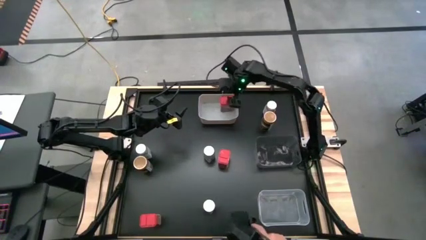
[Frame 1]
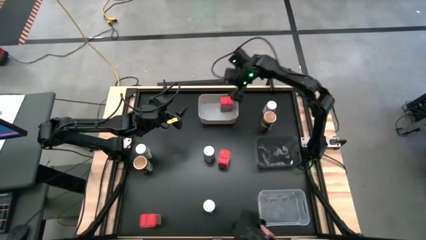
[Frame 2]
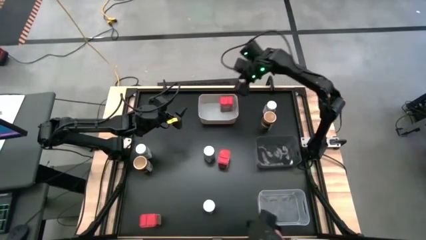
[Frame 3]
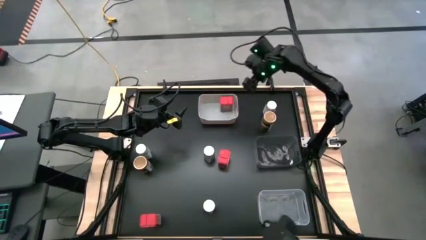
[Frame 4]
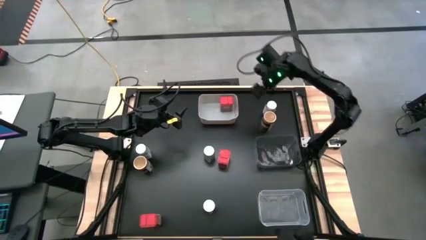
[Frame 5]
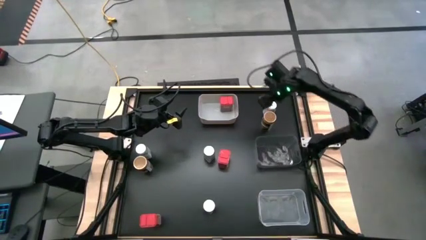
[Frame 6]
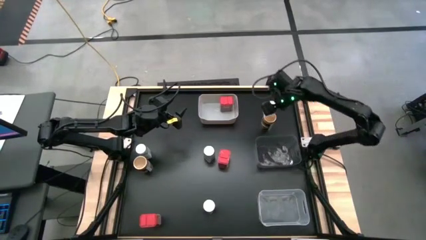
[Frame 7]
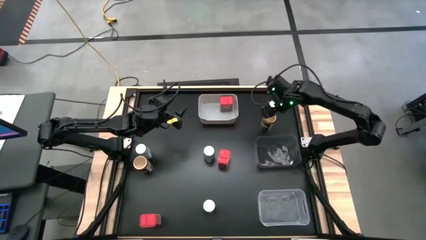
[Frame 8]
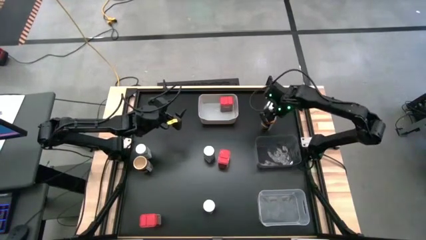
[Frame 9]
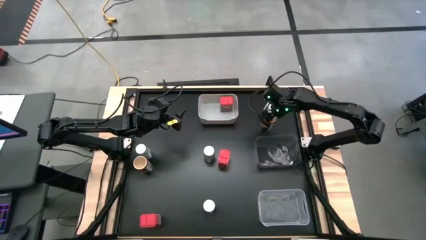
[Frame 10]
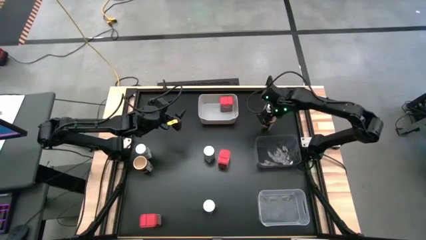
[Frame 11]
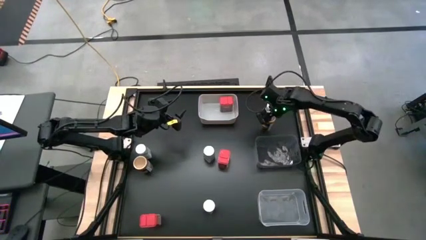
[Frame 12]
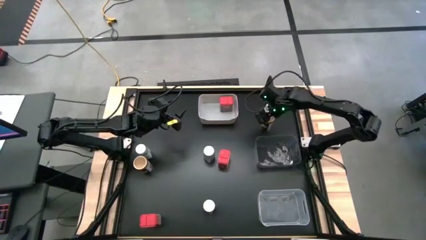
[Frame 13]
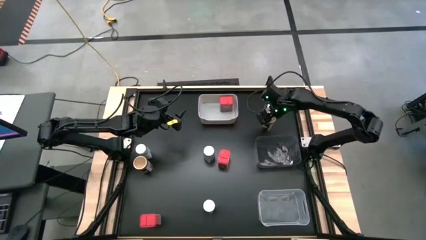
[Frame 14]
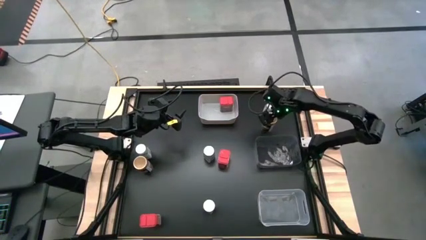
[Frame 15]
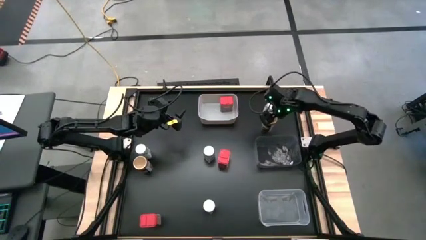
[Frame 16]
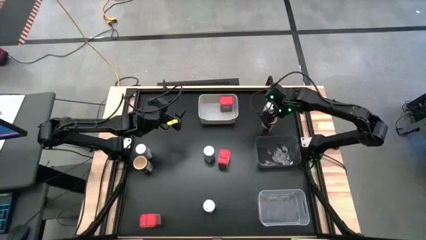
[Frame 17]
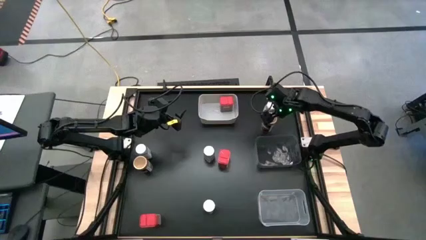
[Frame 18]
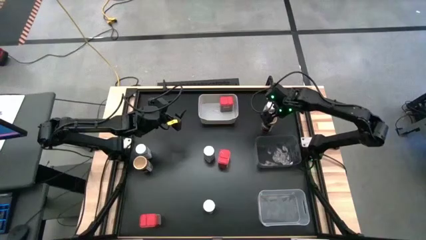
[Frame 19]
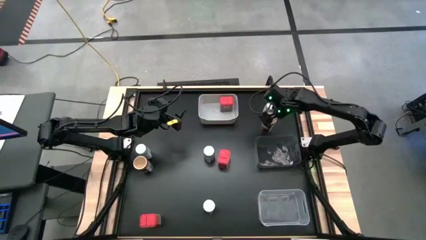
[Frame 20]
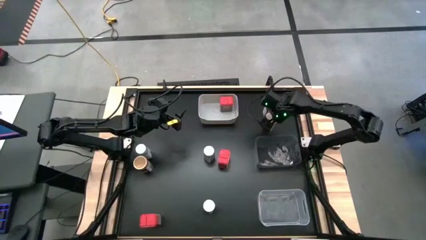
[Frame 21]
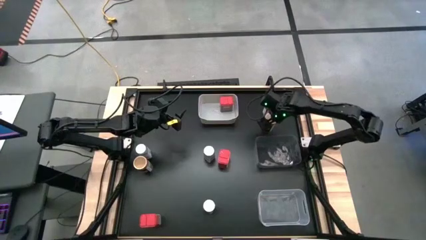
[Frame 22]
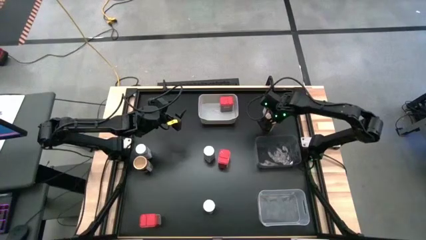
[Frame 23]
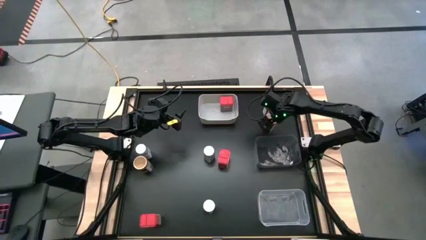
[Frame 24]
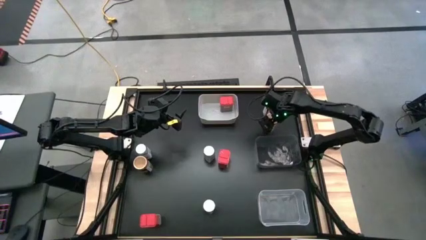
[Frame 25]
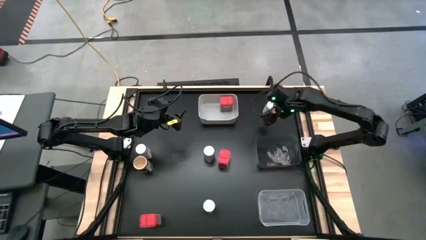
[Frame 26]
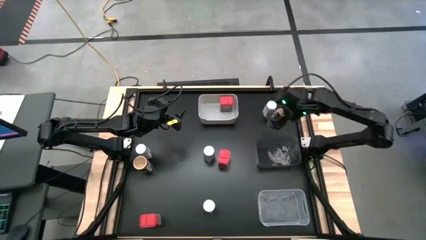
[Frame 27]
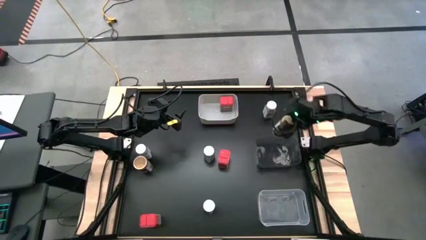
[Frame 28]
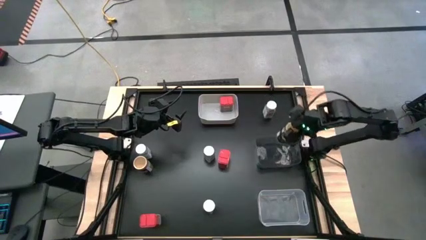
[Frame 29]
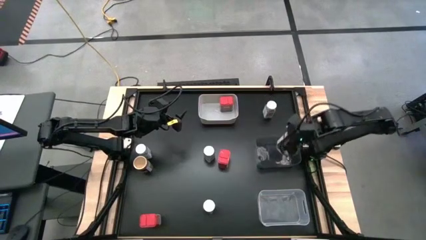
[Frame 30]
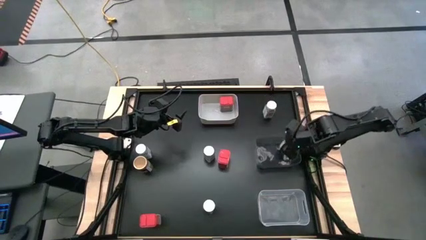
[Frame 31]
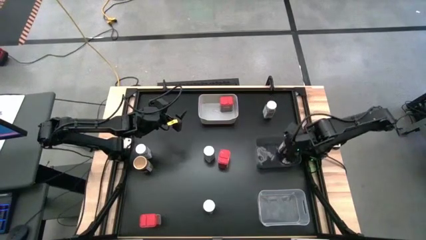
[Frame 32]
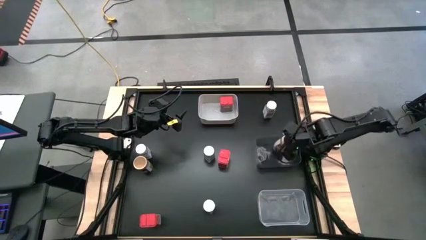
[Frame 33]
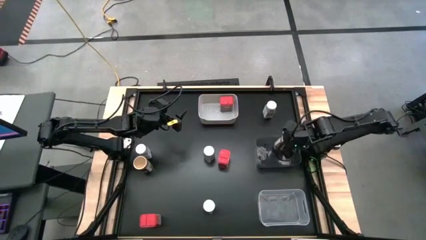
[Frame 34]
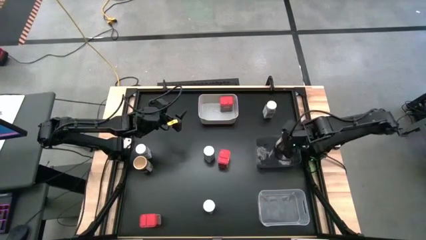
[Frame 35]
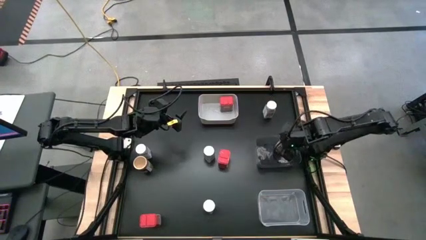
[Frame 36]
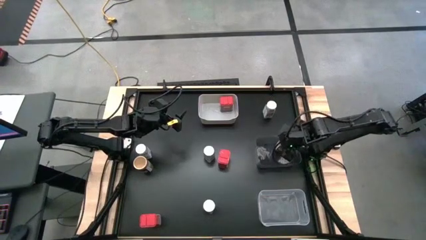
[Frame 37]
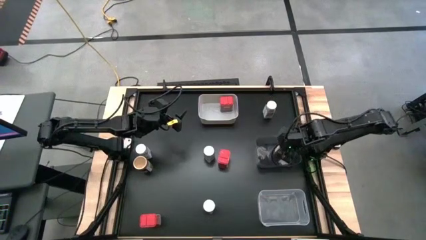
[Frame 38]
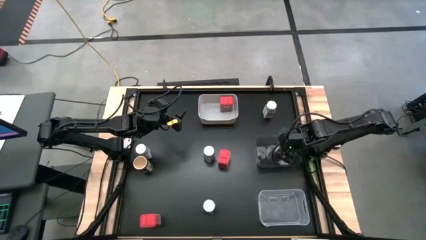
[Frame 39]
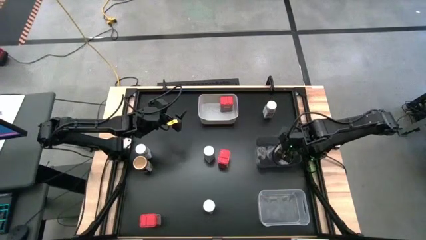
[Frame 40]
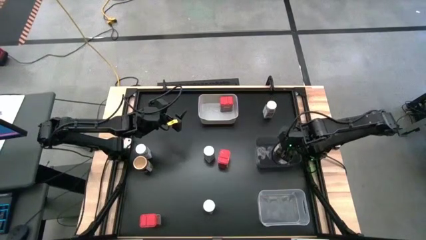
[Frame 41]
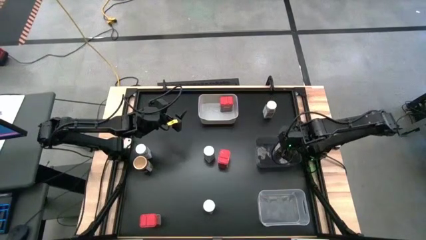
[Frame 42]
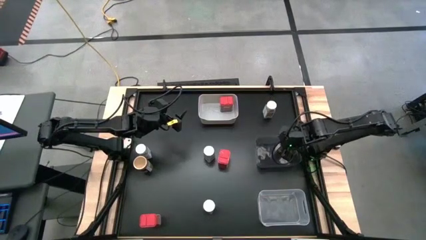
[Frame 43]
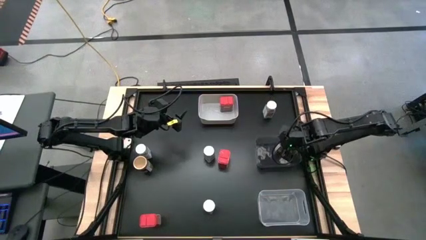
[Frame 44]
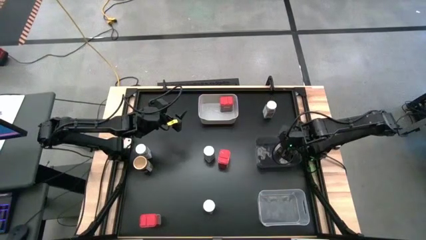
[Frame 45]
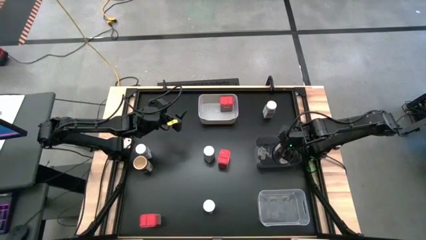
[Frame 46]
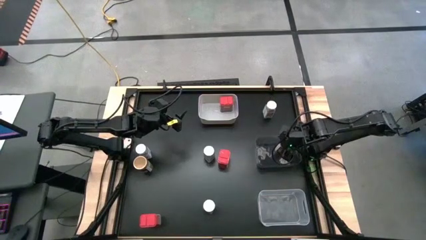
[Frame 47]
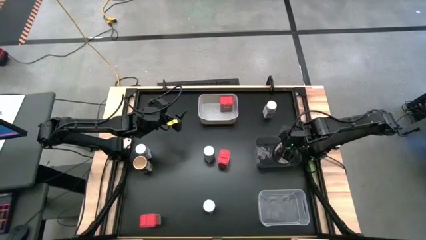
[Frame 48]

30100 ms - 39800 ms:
Task: Sort spices by type
Put the top golden seasoning bottle into the black bin

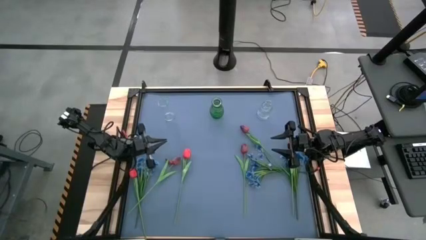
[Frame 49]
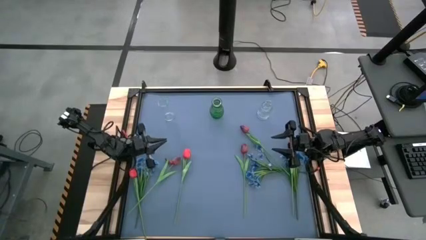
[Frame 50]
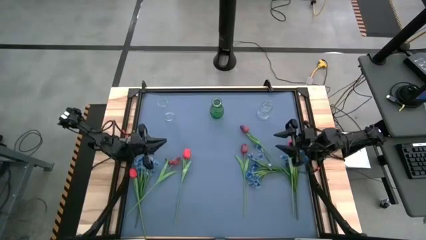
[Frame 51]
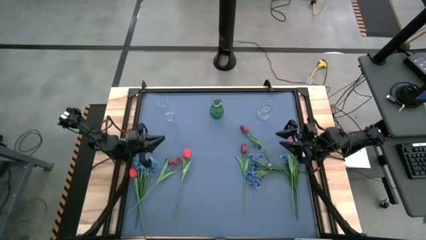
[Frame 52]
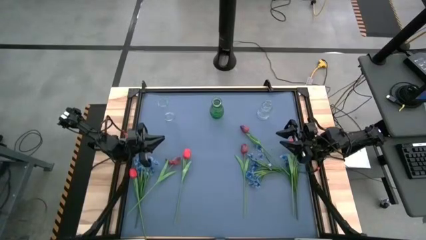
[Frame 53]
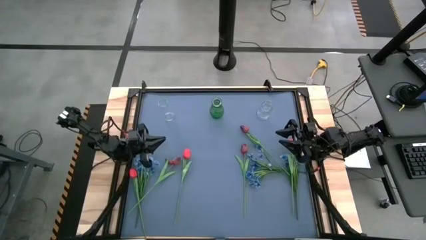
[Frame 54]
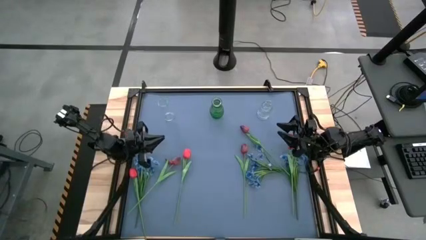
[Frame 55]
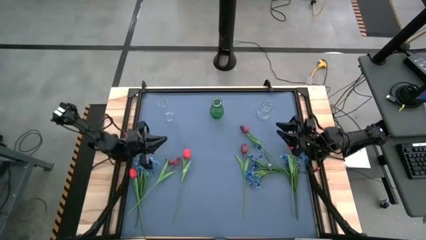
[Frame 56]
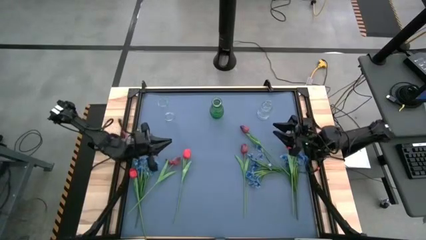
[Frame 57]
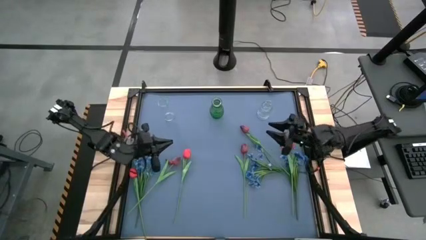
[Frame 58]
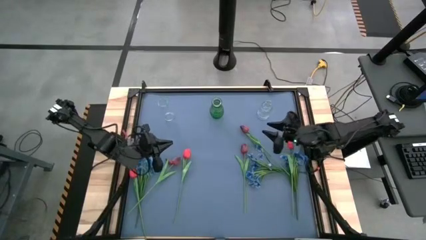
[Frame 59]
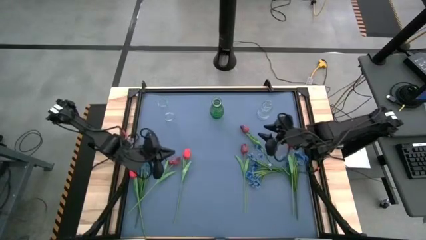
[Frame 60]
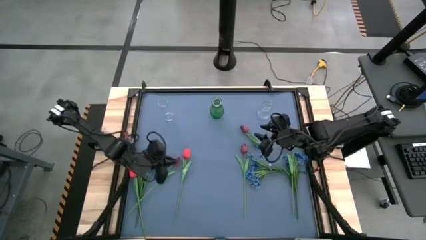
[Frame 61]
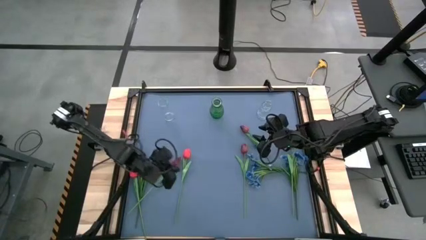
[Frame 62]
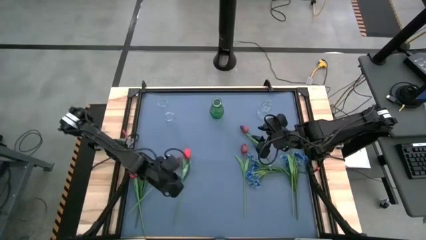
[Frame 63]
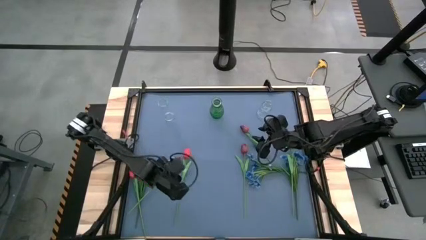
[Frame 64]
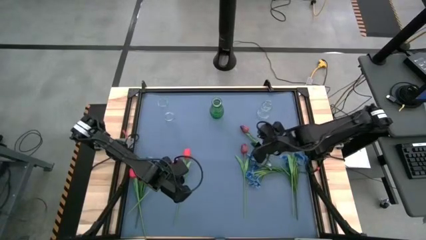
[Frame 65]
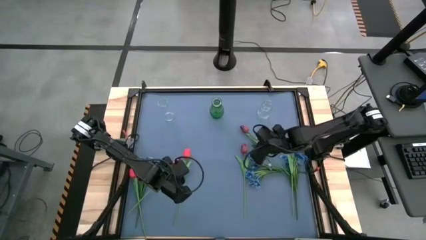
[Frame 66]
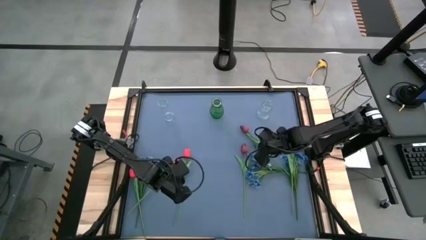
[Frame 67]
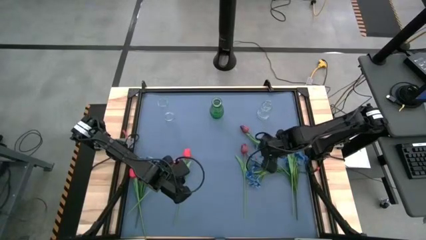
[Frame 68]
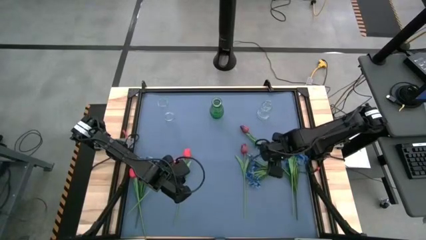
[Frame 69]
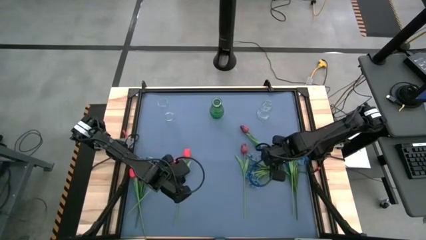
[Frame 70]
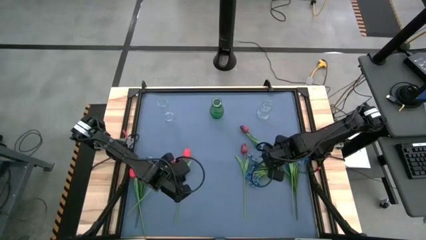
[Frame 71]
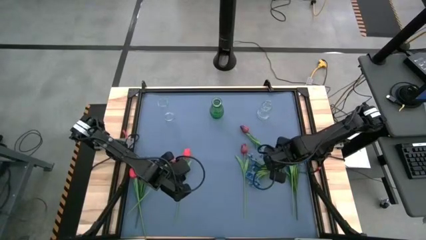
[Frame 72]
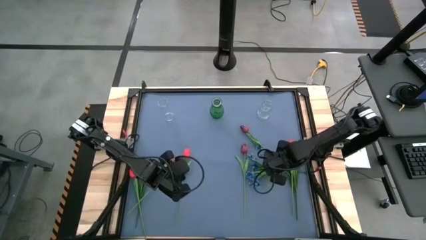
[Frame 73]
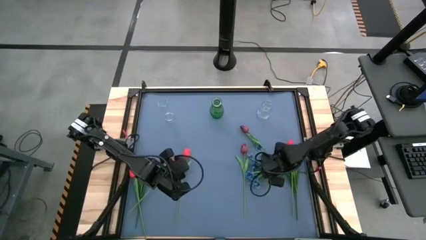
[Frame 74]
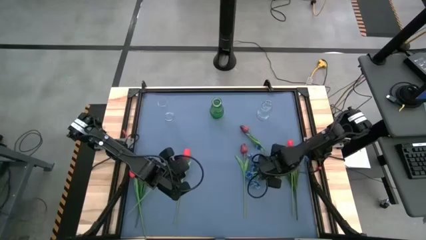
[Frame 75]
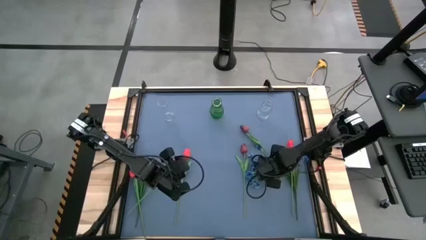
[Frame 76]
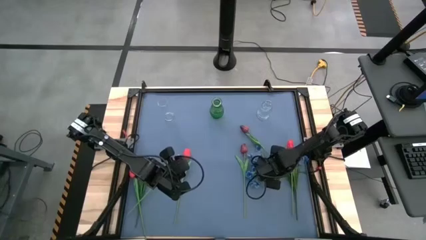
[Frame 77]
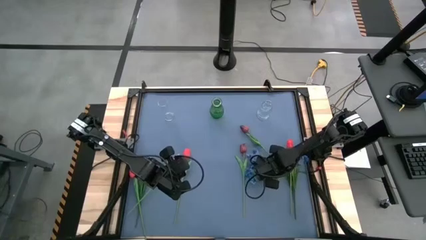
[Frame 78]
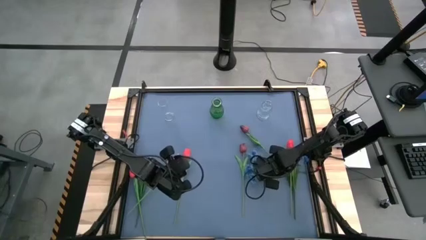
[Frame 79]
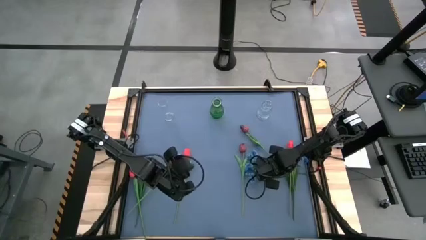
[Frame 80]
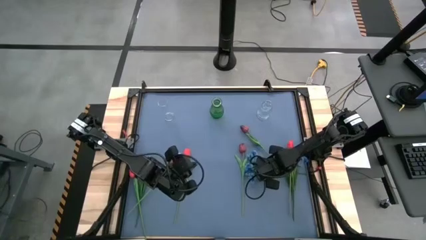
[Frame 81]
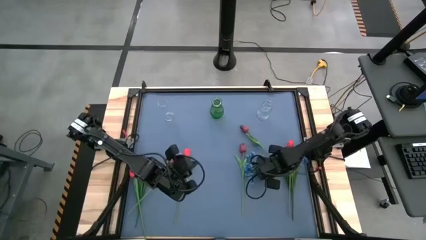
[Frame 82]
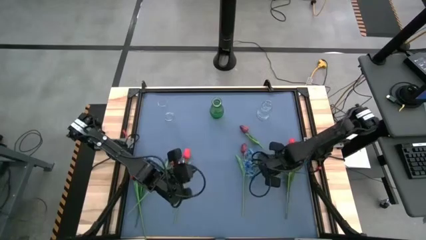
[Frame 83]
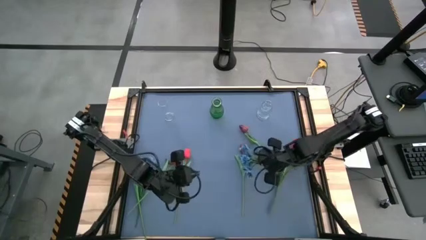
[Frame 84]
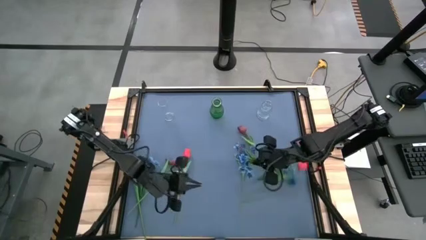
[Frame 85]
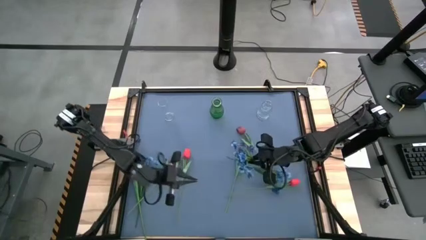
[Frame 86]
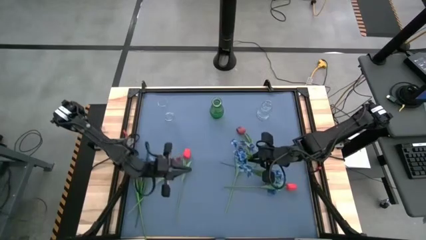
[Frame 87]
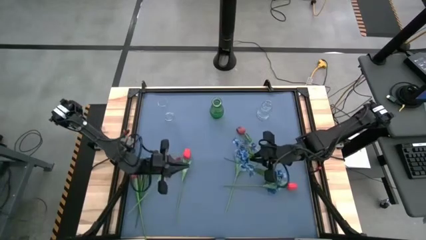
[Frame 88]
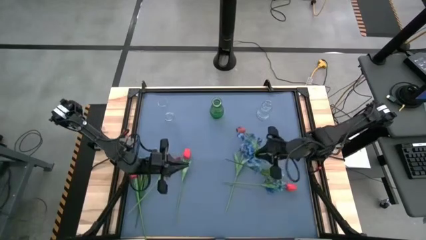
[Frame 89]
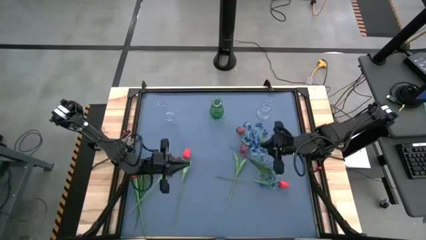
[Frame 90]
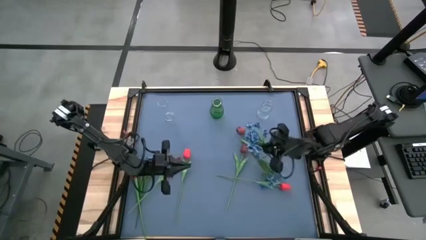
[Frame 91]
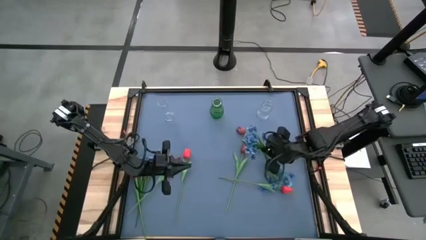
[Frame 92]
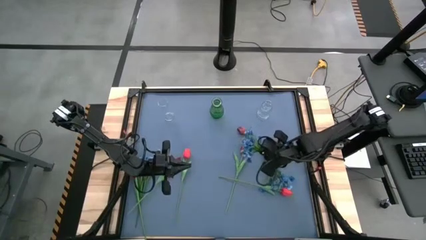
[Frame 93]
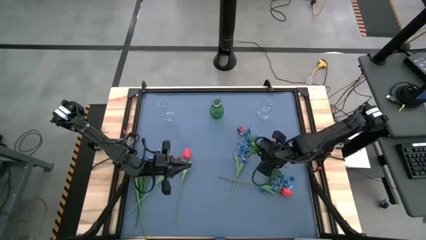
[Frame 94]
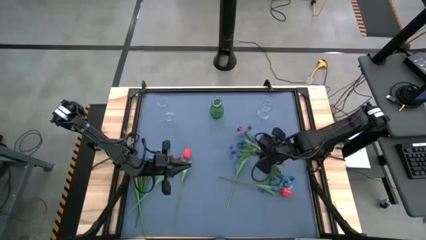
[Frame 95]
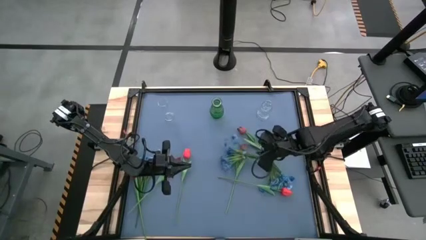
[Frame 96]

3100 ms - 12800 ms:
Task: Sort flowers into vase by color
Put the center blue flower into the green vase
